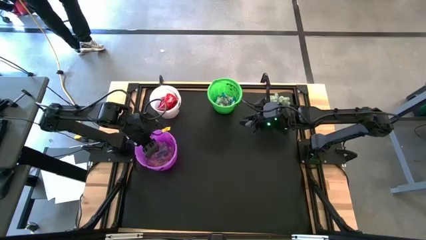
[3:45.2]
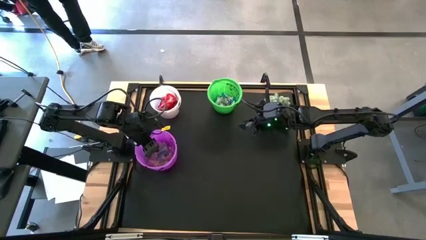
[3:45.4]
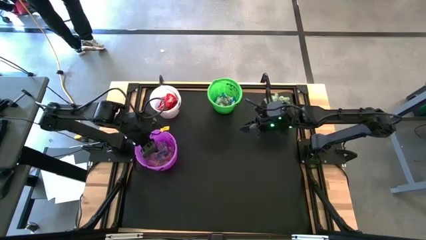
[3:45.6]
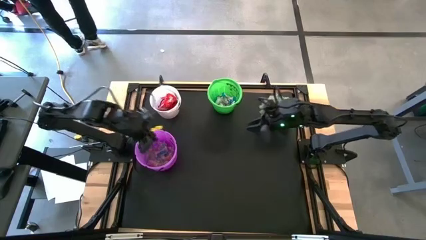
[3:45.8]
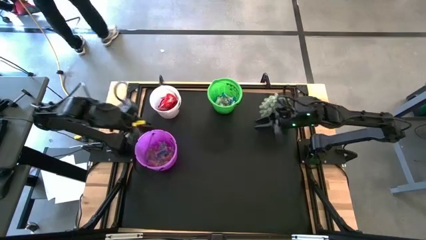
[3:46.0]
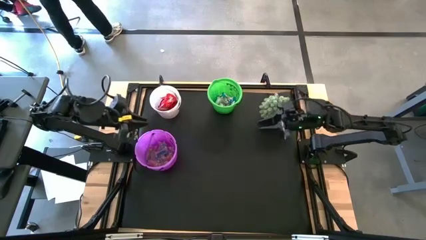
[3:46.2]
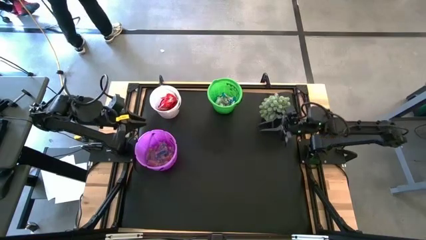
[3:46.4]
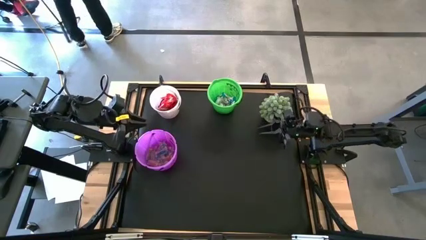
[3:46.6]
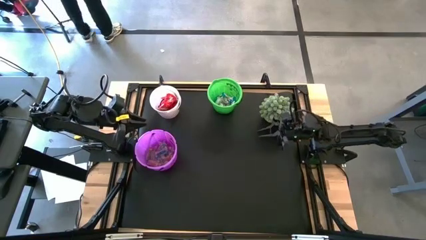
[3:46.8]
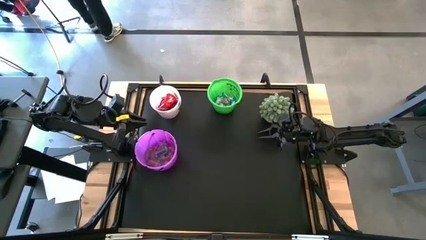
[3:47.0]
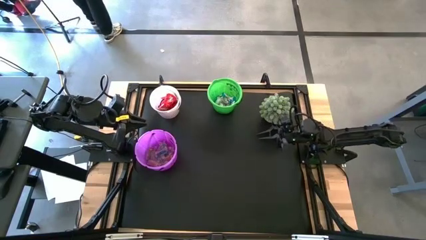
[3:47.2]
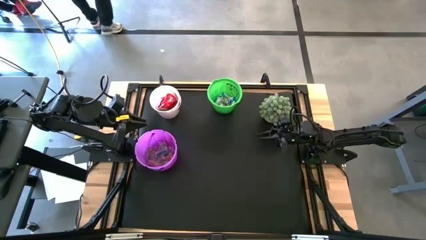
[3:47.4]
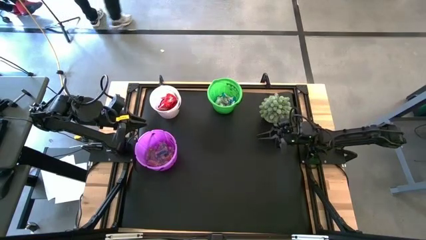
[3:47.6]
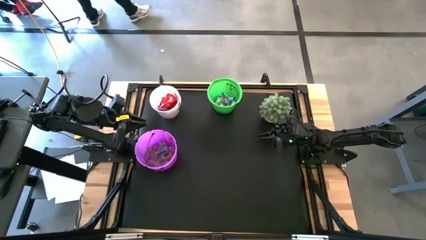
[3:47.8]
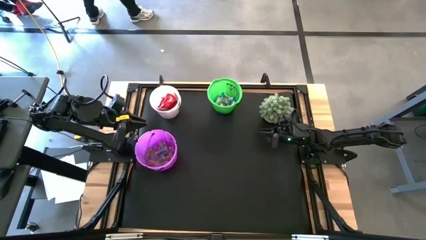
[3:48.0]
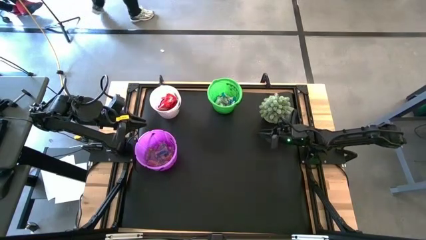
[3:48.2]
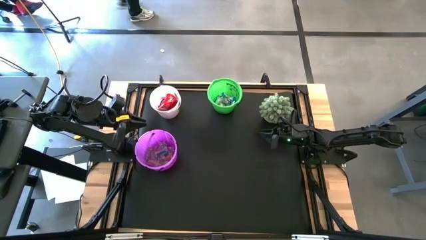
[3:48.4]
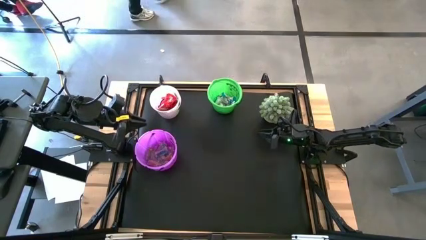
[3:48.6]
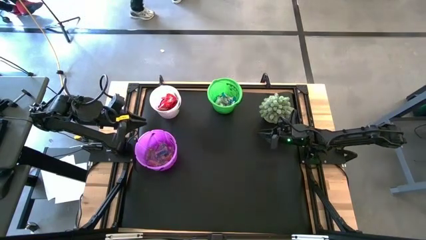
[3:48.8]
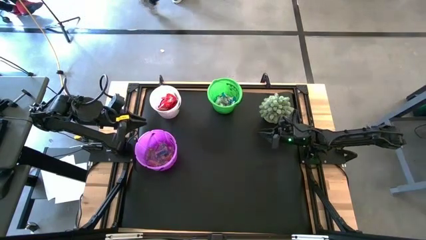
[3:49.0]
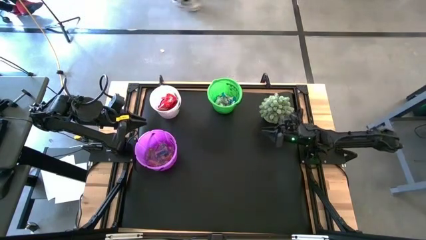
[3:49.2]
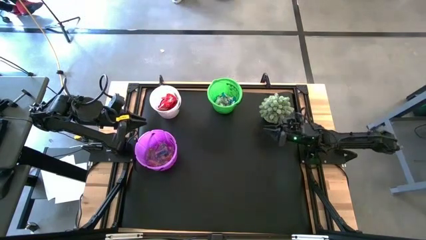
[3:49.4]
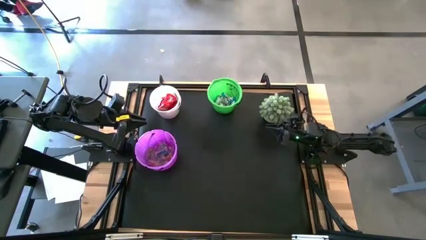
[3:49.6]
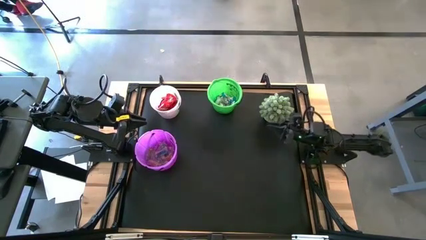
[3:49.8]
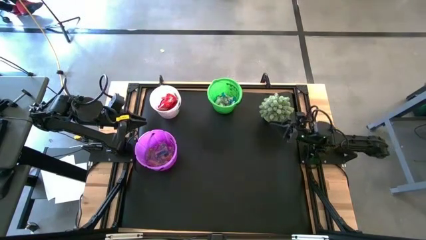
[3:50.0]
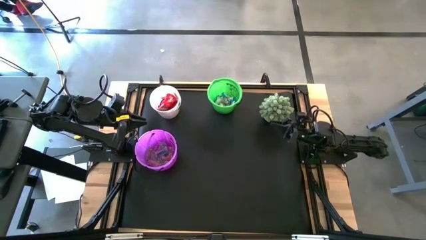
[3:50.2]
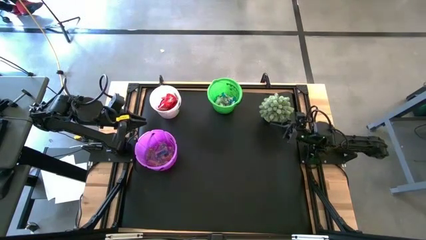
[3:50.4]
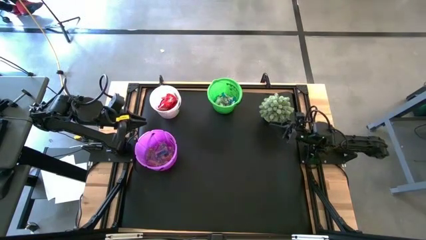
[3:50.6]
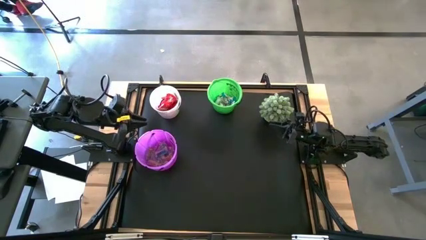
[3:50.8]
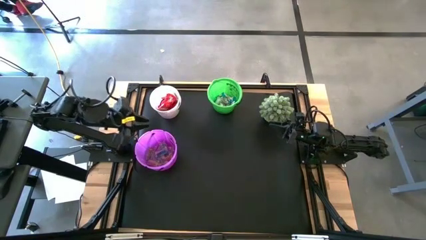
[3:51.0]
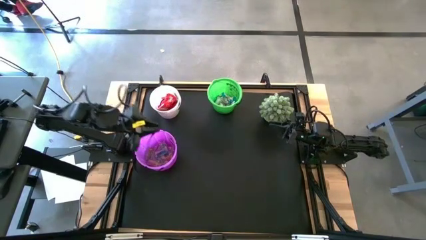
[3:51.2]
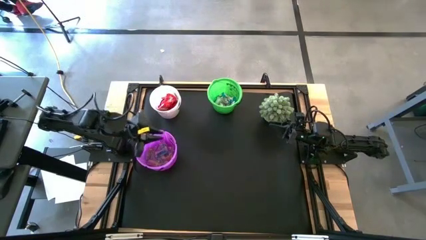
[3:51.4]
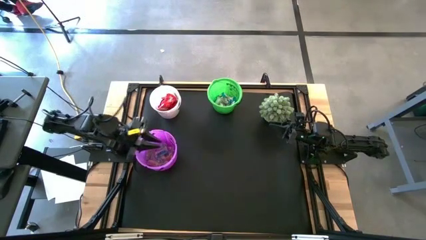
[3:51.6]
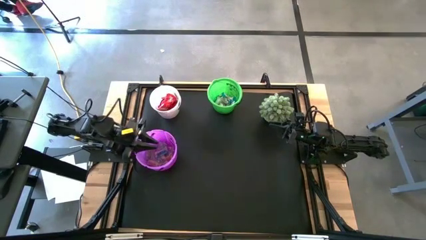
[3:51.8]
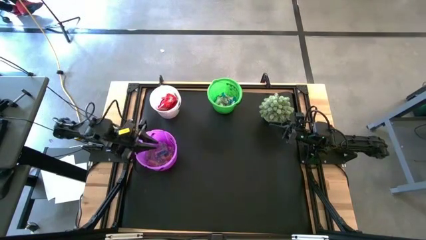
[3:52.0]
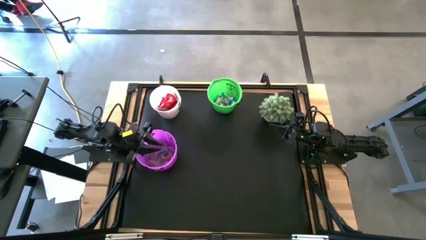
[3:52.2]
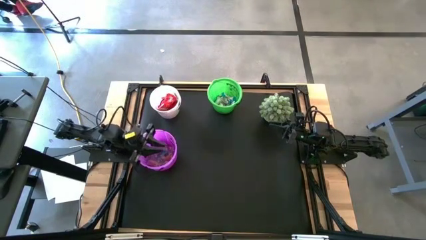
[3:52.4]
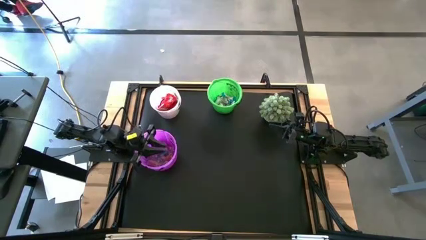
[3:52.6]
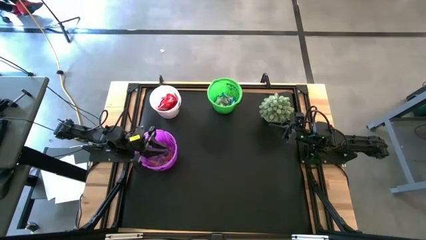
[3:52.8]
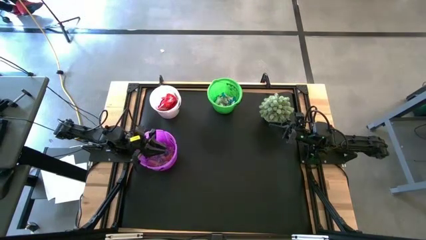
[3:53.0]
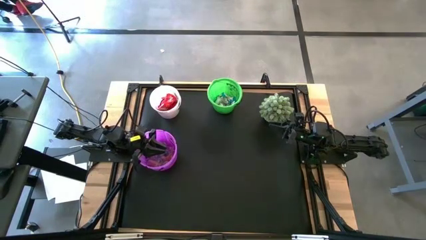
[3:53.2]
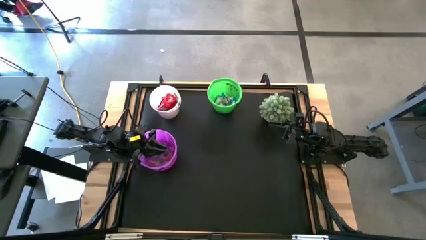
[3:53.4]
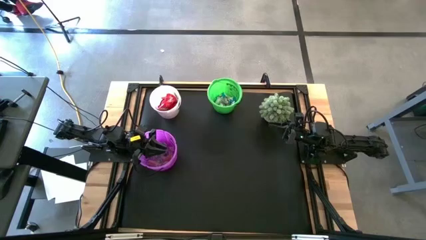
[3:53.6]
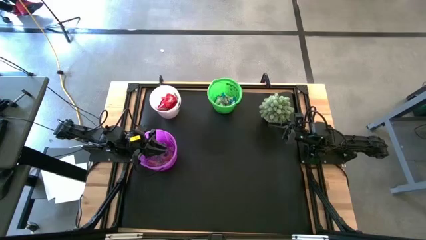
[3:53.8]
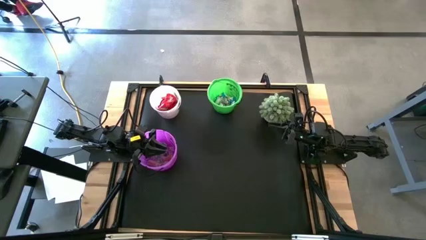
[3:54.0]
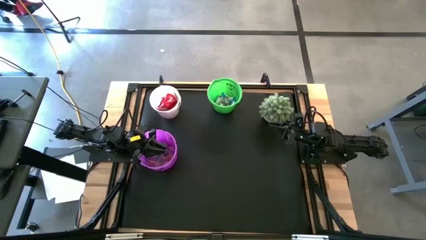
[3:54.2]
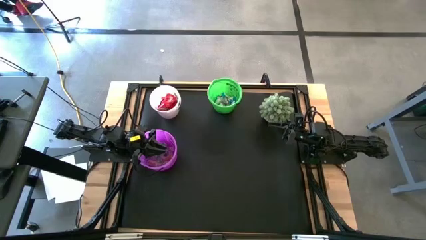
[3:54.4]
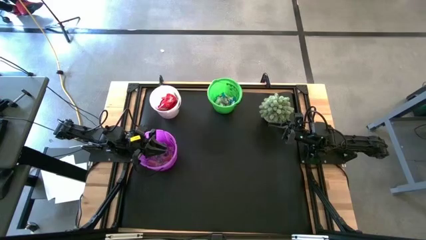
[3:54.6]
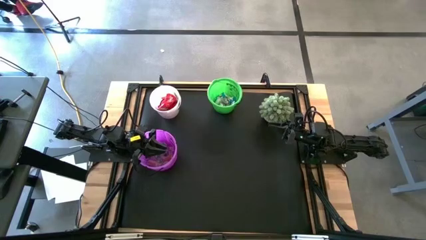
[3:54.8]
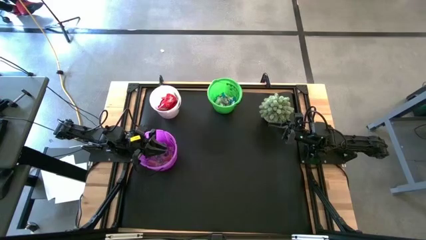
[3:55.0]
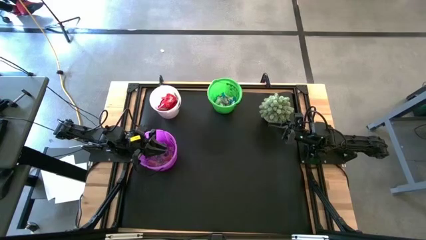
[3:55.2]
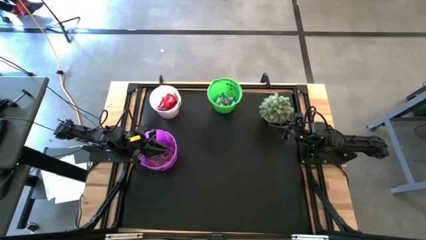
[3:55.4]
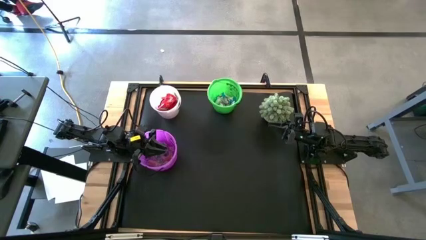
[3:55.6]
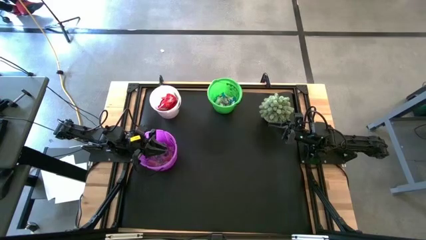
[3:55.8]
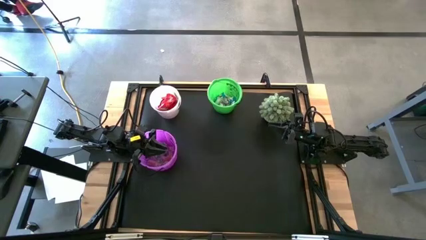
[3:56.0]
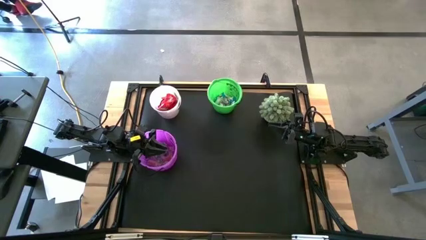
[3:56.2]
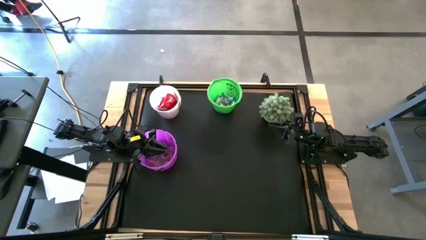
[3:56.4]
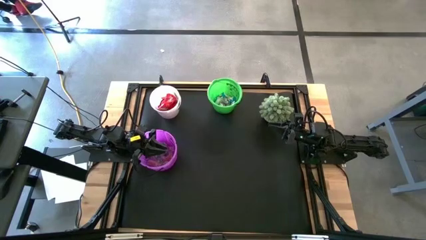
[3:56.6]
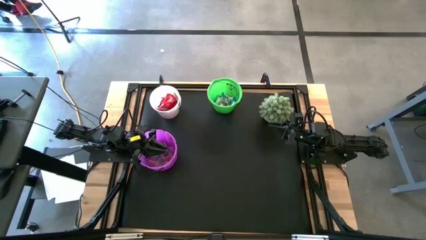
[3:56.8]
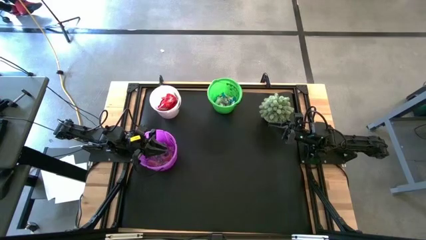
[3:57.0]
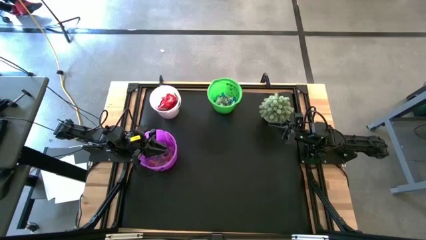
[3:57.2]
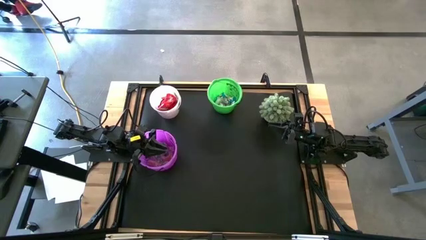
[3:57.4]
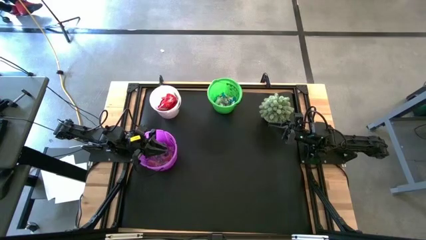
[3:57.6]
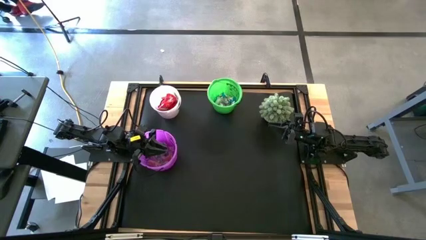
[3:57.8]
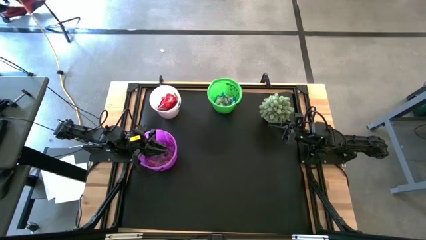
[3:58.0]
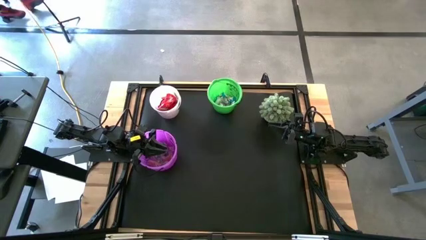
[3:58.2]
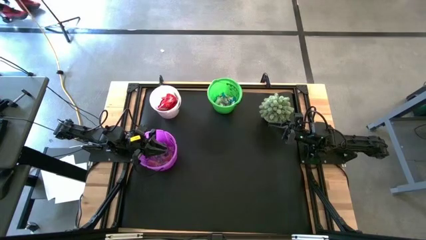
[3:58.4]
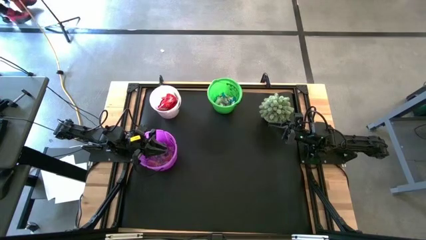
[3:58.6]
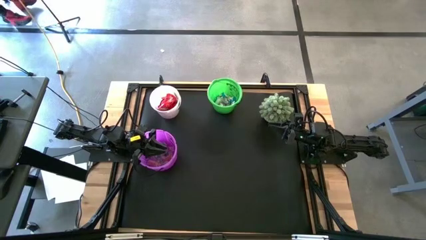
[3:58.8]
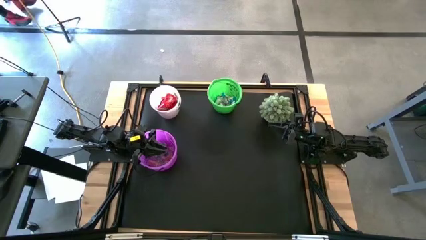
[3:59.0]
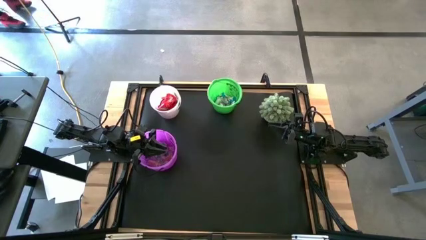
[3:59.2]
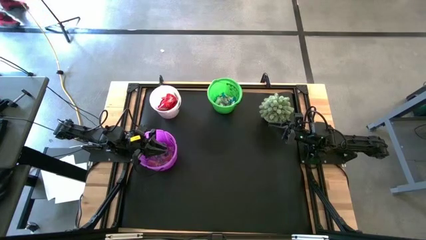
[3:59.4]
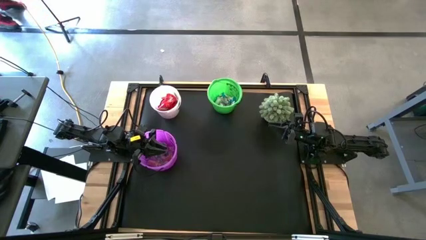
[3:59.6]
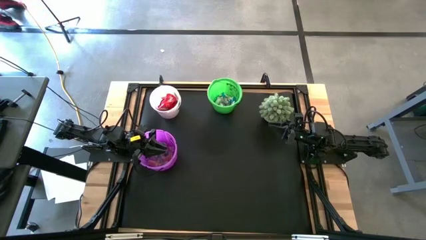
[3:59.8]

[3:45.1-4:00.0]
Task: Sort candy
Return to Home Position
